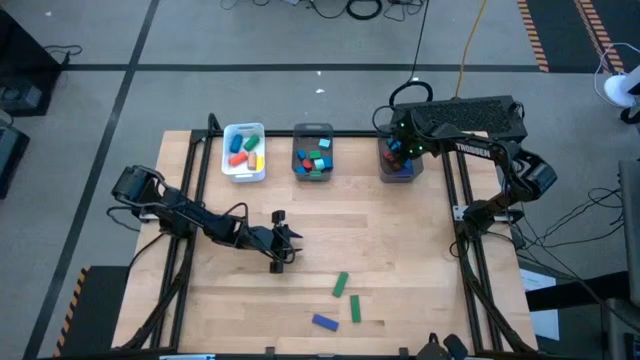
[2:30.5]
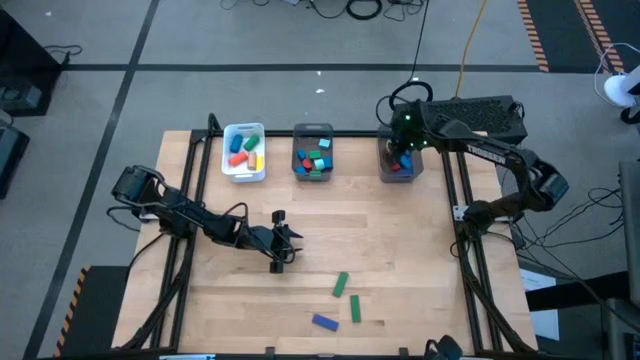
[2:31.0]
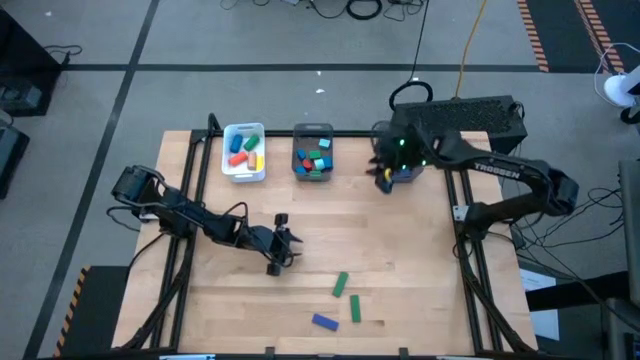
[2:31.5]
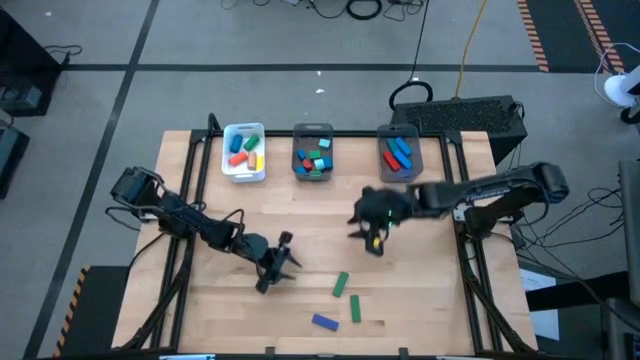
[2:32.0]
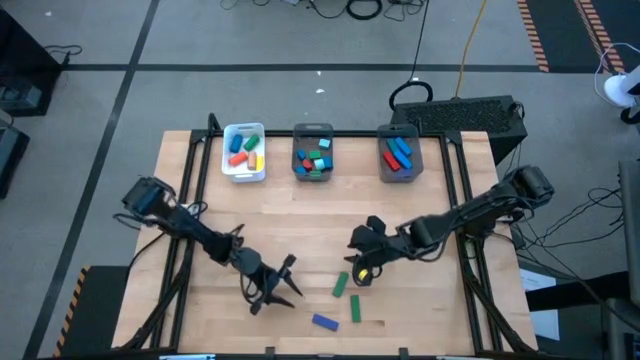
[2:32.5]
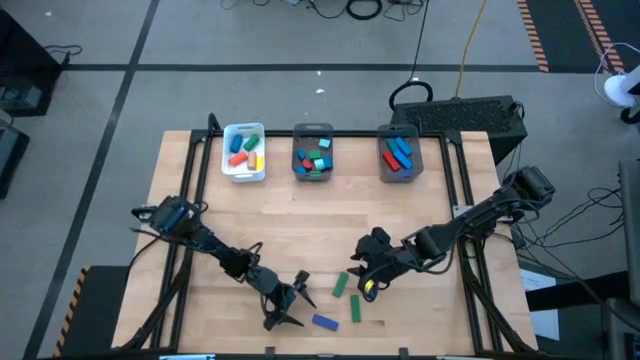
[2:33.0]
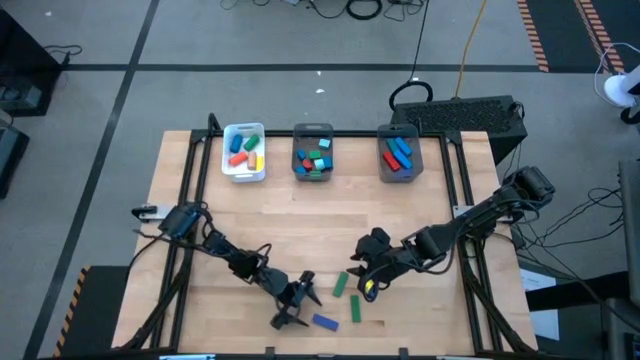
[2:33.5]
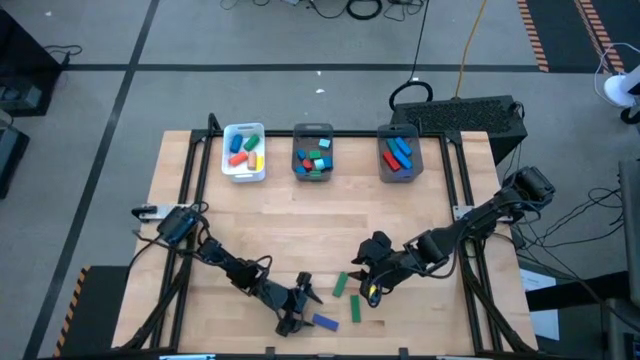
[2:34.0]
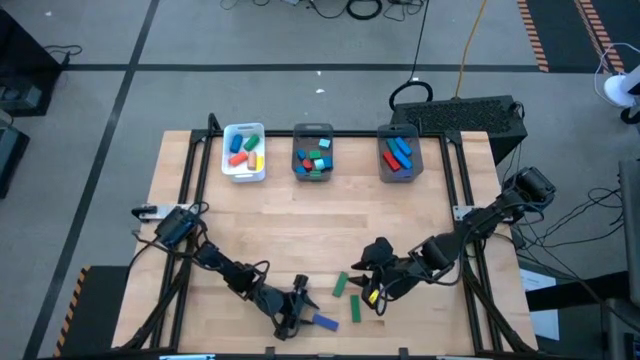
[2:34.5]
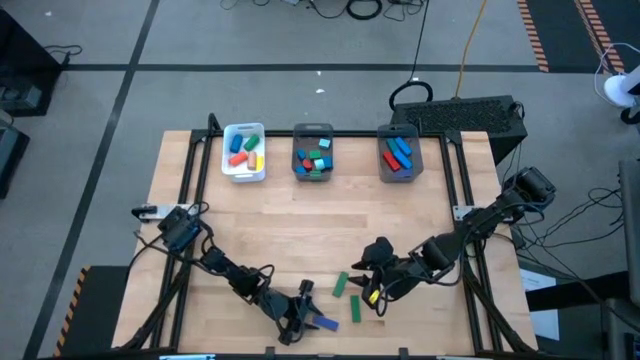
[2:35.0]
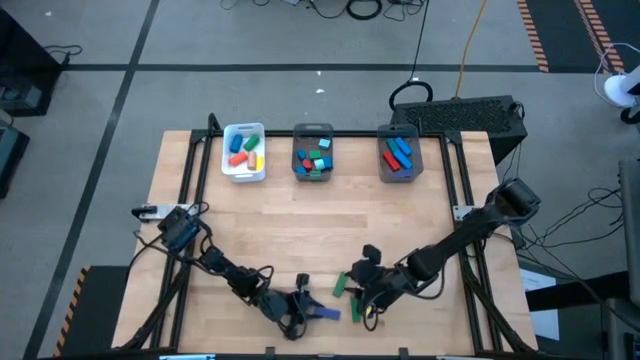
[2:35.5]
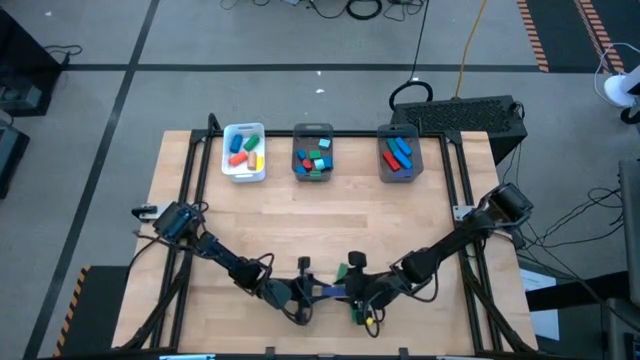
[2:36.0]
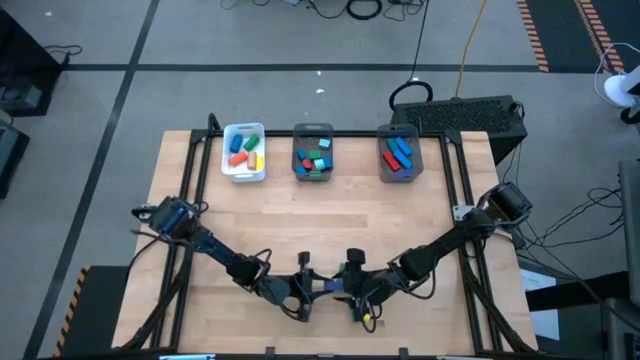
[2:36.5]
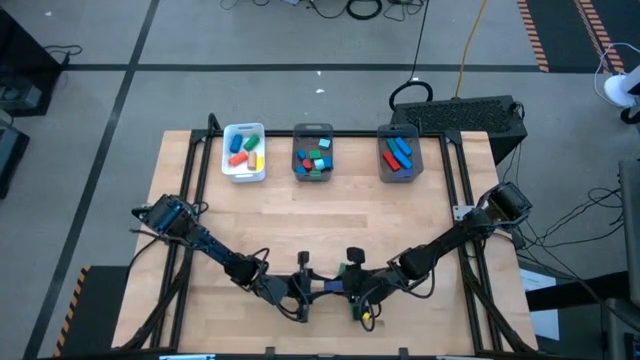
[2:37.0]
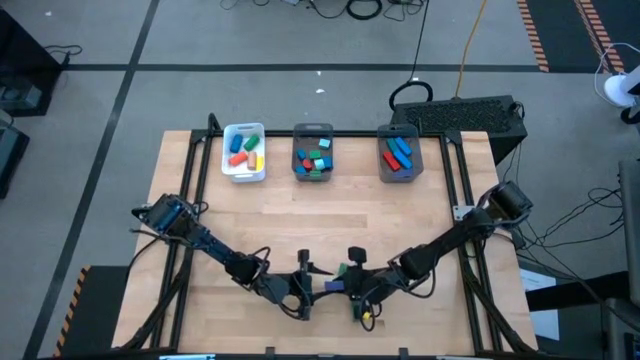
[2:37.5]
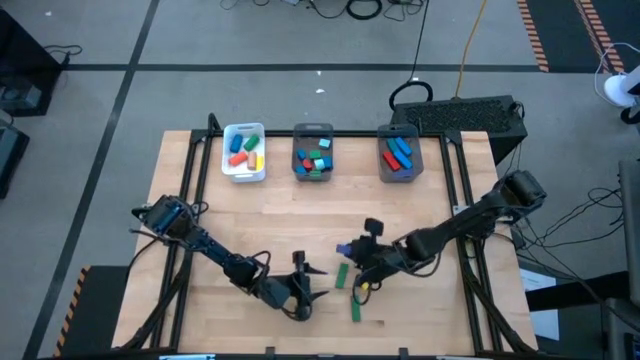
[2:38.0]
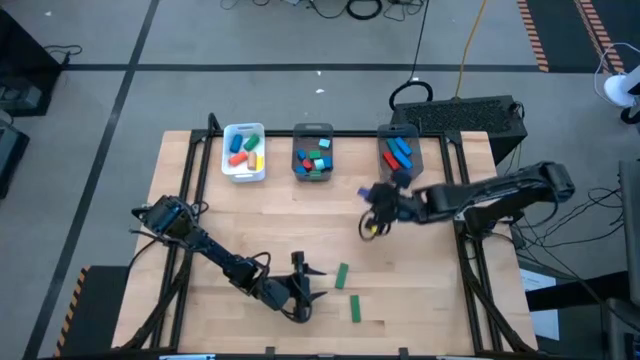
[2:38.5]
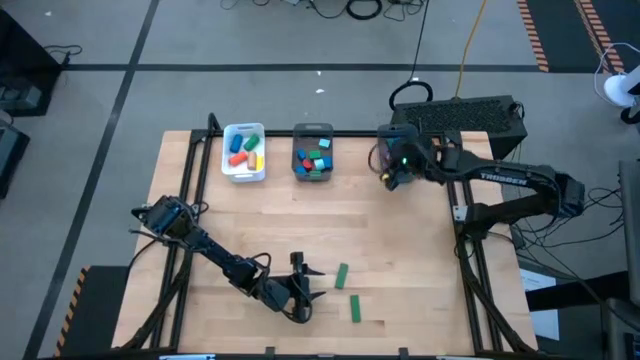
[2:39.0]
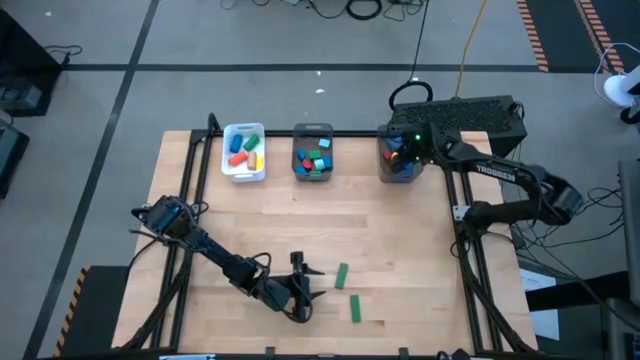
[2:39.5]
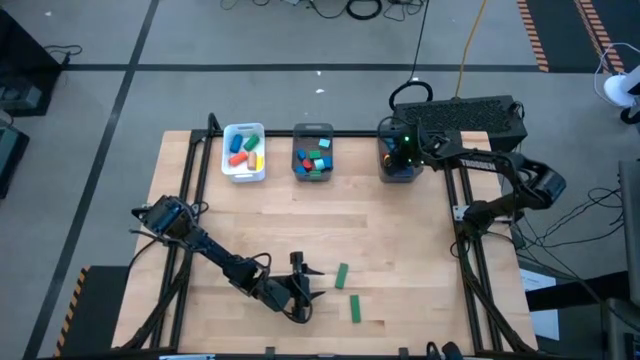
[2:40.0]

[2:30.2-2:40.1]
Task: Sort blocks by size
Put the dark blue rectangular block into the right black bin

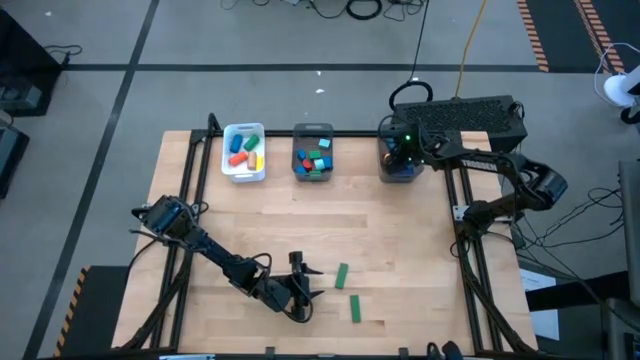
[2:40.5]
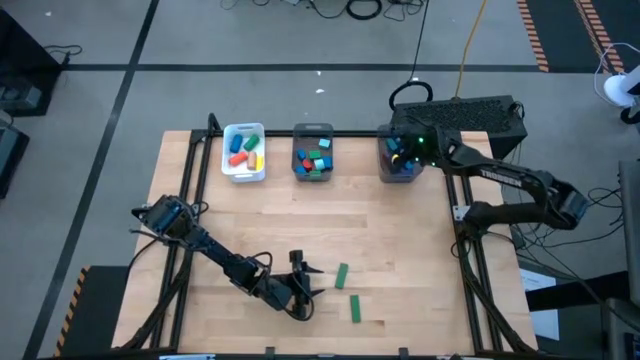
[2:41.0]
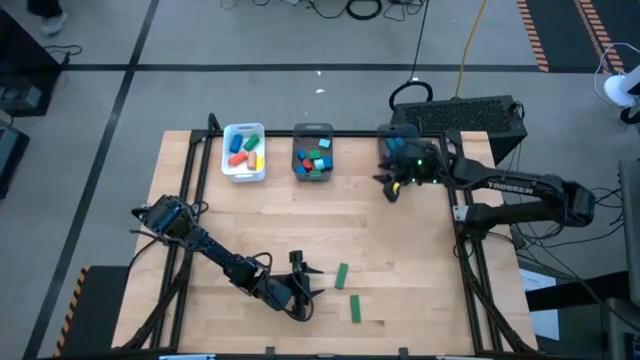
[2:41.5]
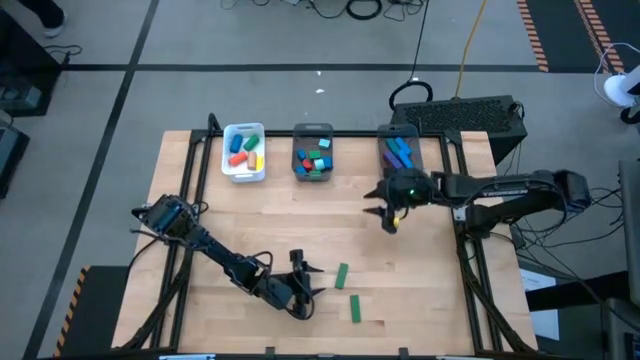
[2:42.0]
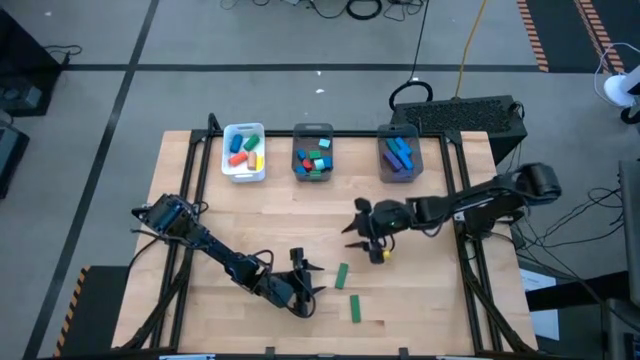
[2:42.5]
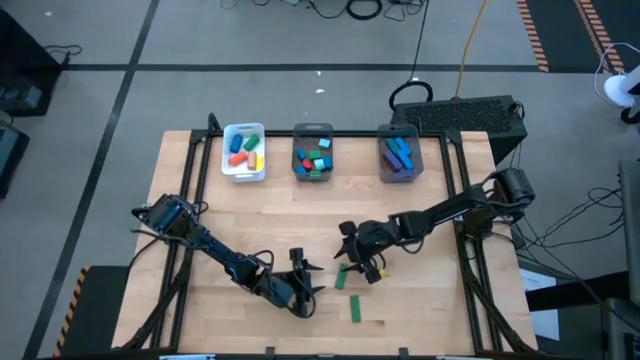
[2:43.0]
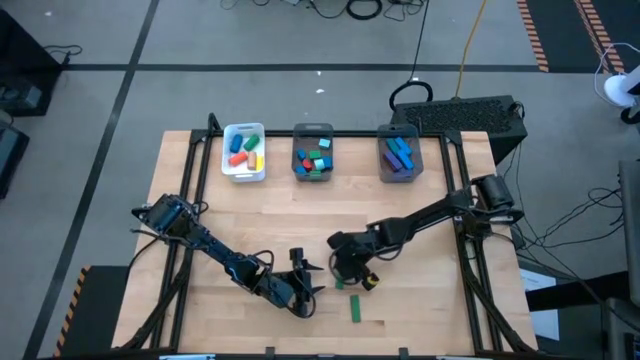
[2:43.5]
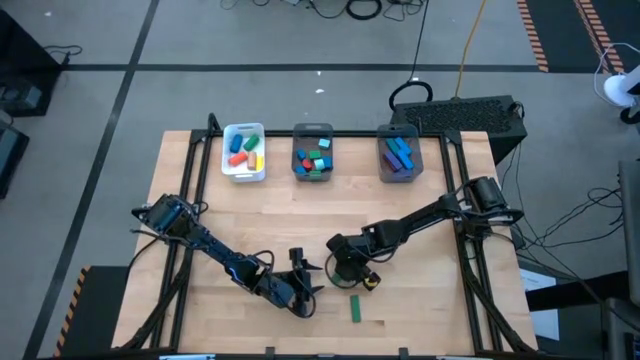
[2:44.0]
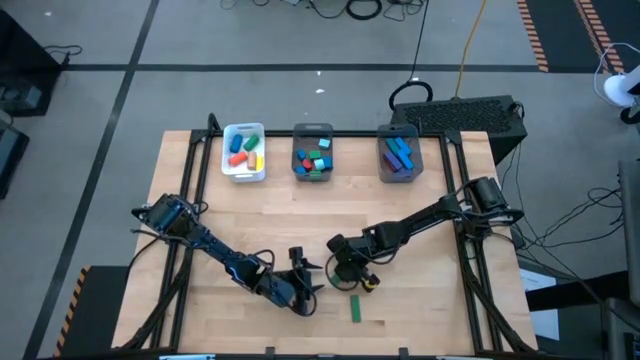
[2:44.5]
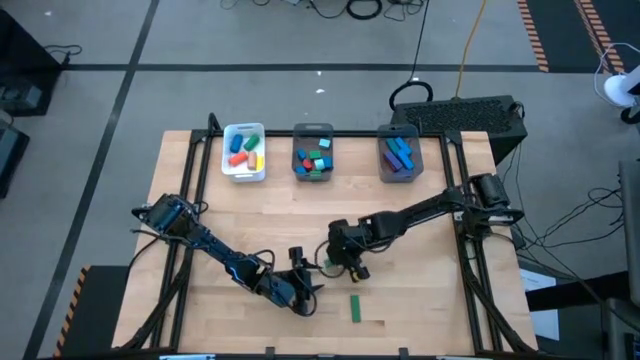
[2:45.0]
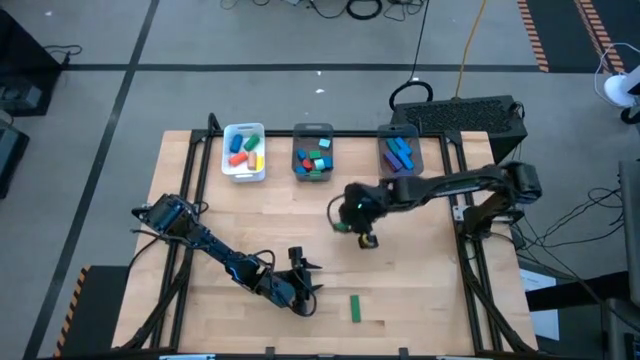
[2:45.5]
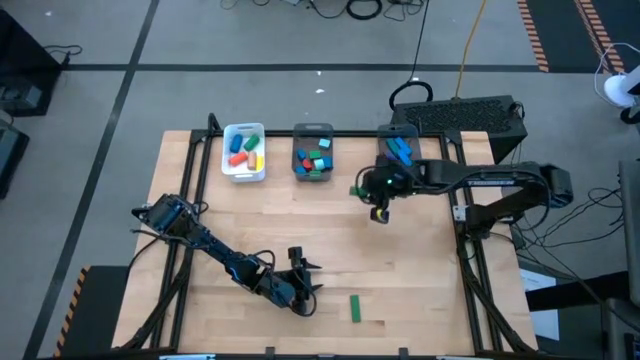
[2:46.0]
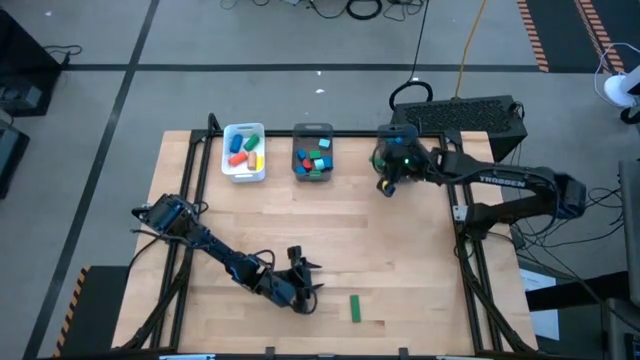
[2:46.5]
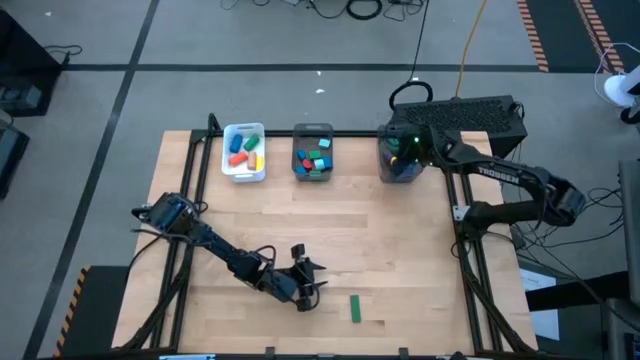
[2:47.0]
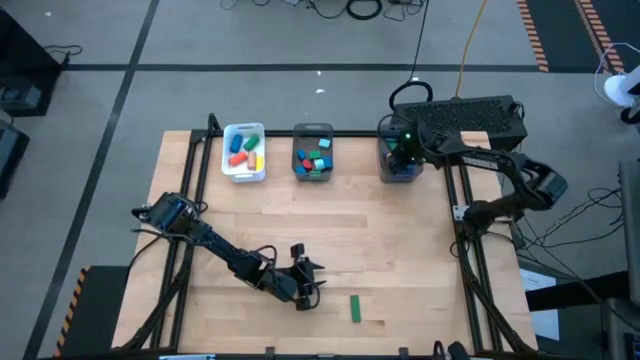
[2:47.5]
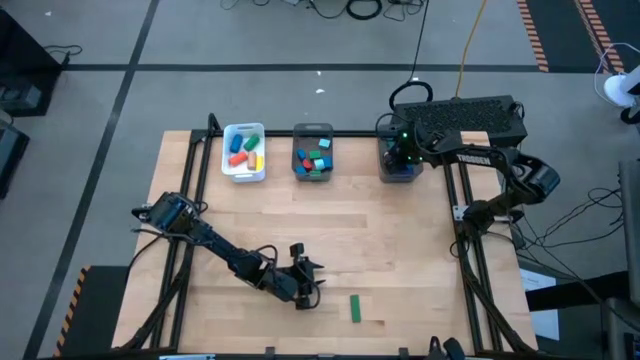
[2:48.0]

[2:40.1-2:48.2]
Put the green rectangular block into the right black bin

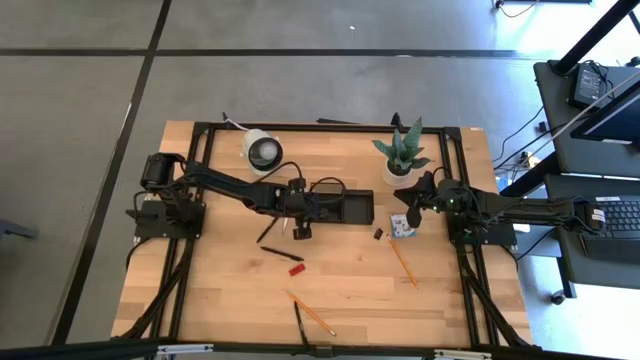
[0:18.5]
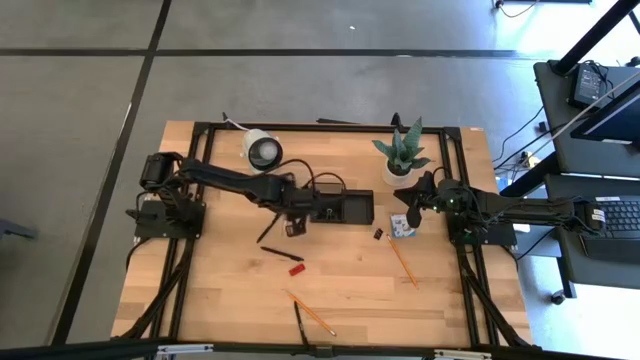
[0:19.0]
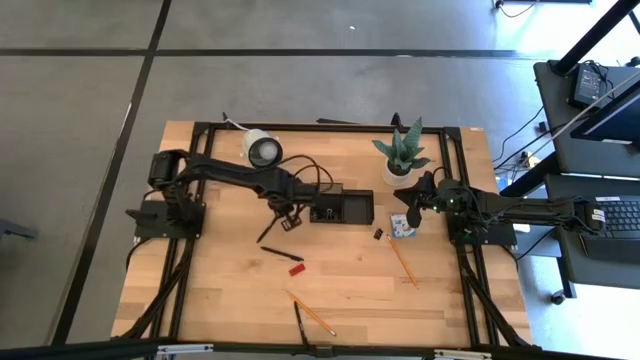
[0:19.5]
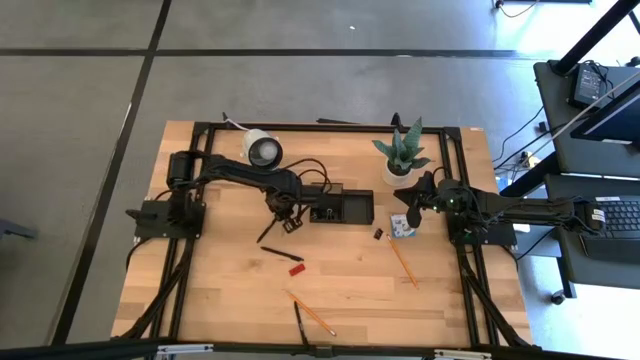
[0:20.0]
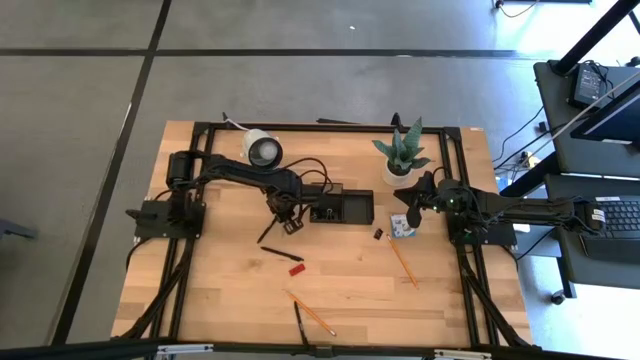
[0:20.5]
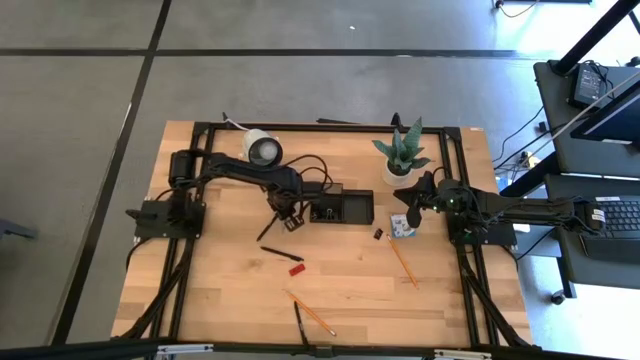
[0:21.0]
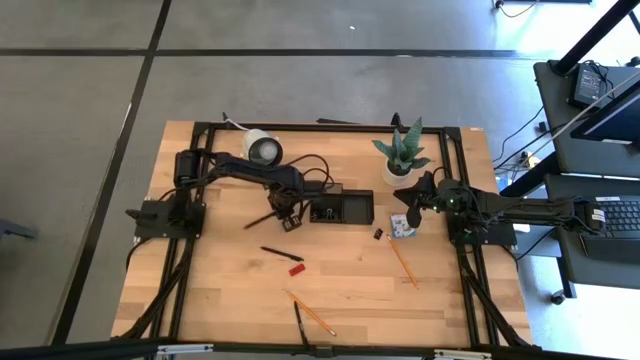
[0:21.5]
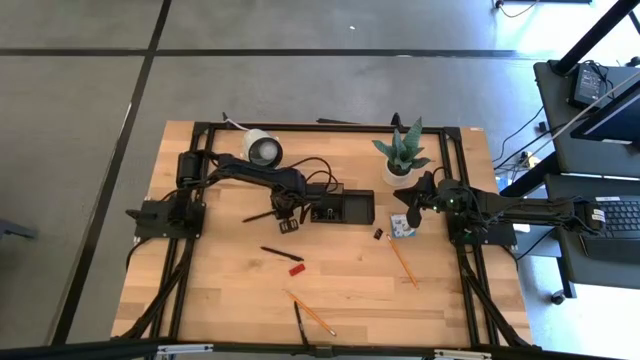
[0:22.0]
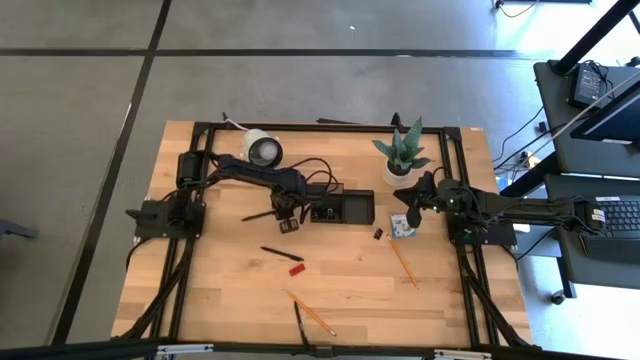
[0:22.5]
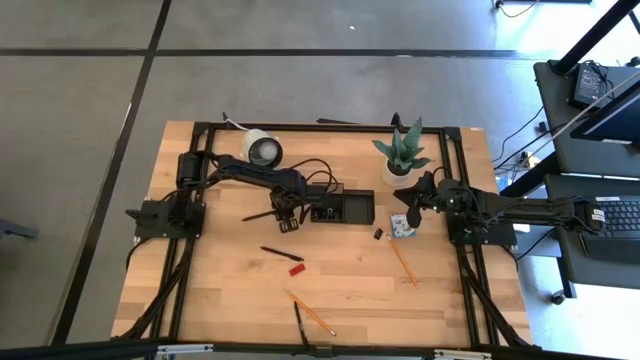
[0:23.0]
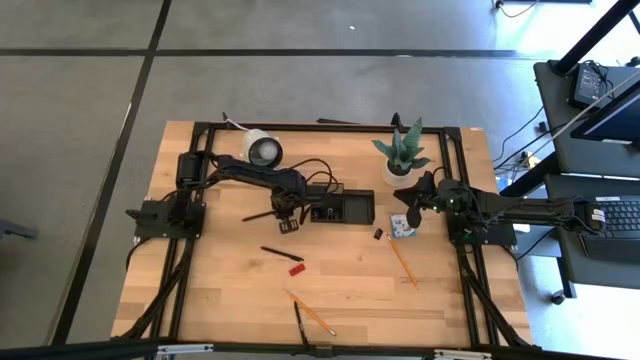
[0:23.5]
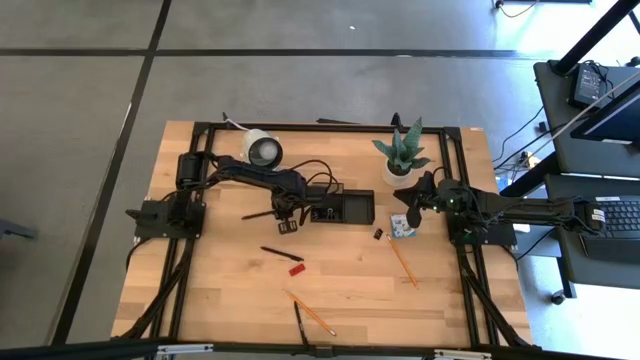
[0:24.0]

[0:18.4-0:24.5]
Task: Pick and place office supplies into organizer
Put the top black pen in the desk organizer
